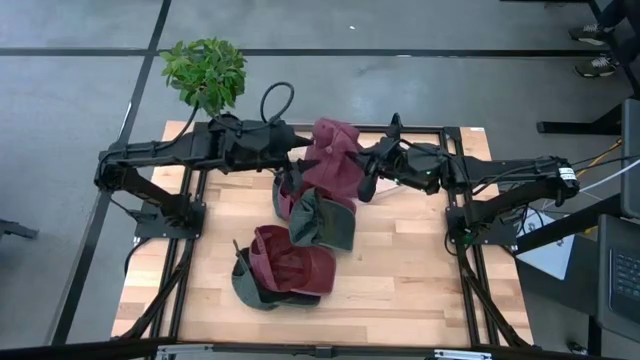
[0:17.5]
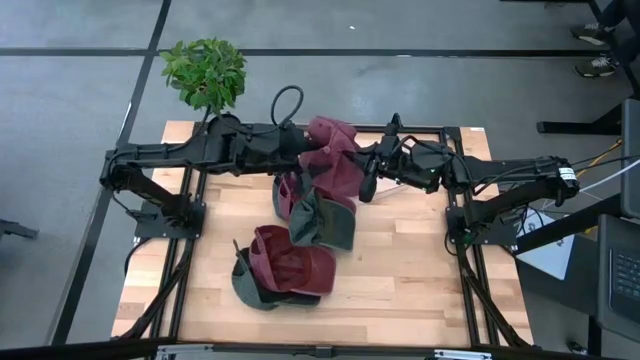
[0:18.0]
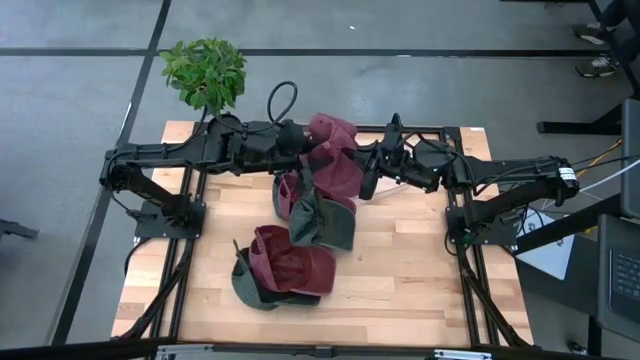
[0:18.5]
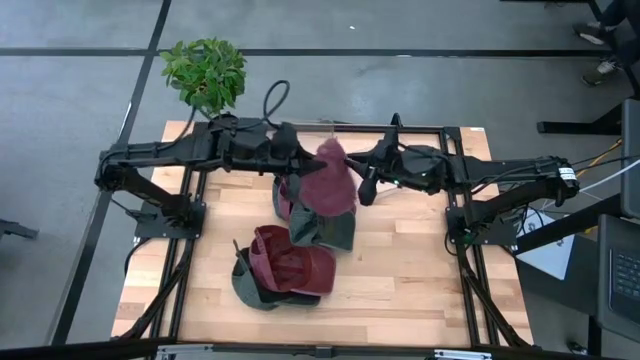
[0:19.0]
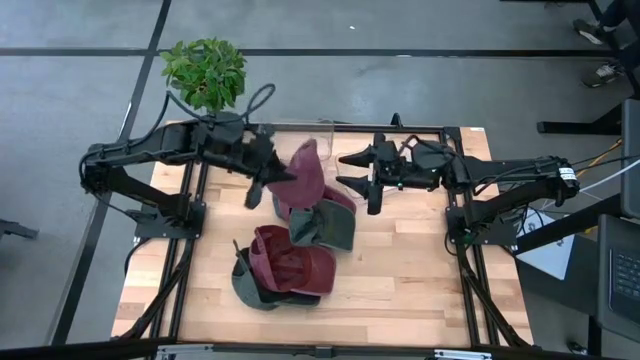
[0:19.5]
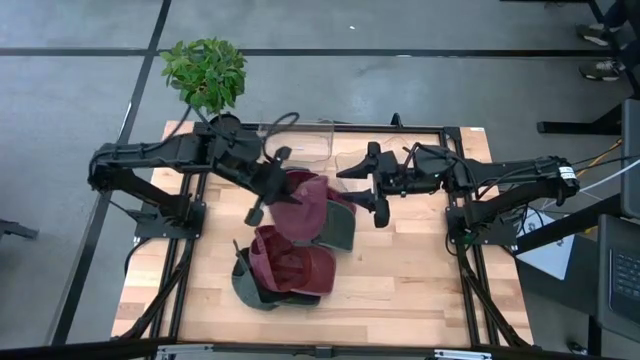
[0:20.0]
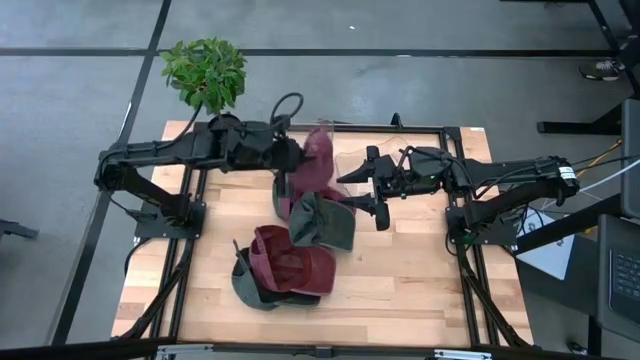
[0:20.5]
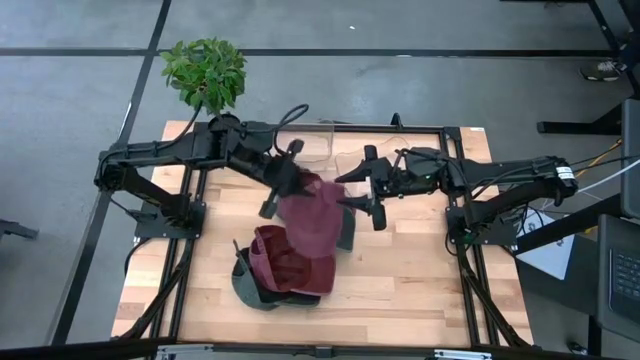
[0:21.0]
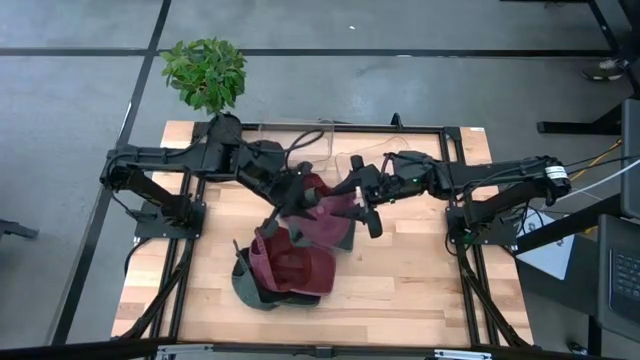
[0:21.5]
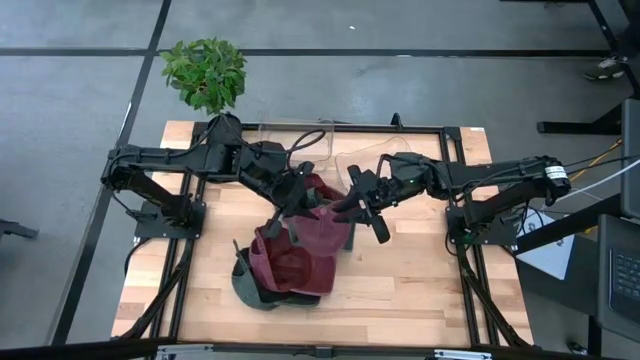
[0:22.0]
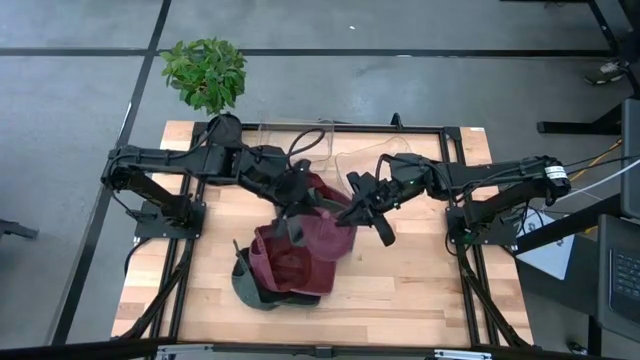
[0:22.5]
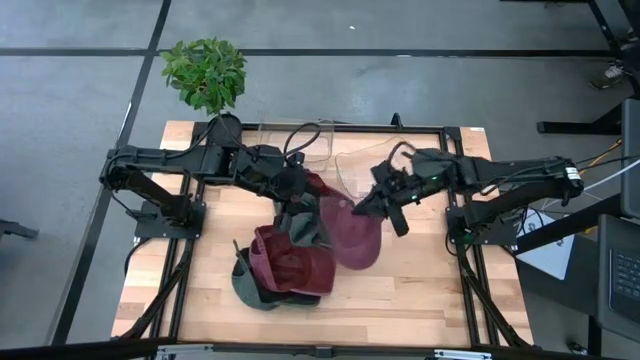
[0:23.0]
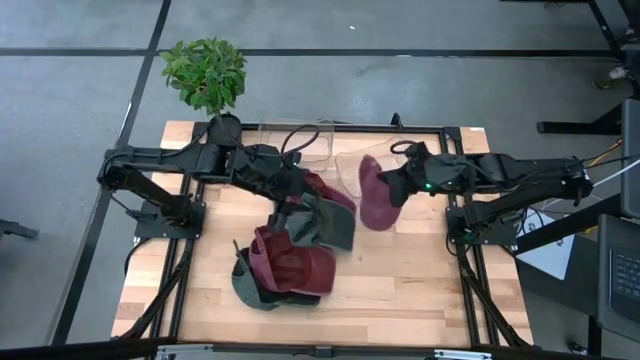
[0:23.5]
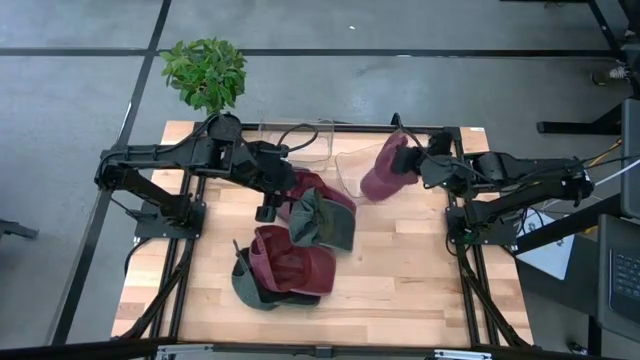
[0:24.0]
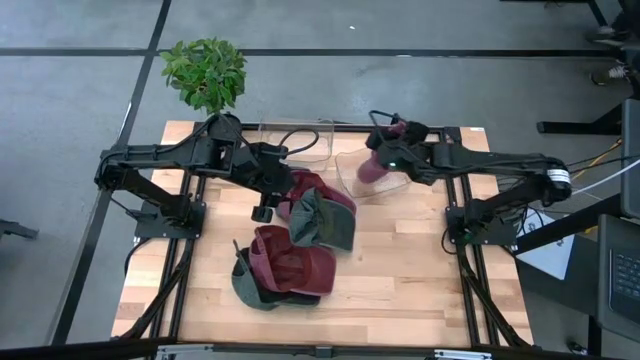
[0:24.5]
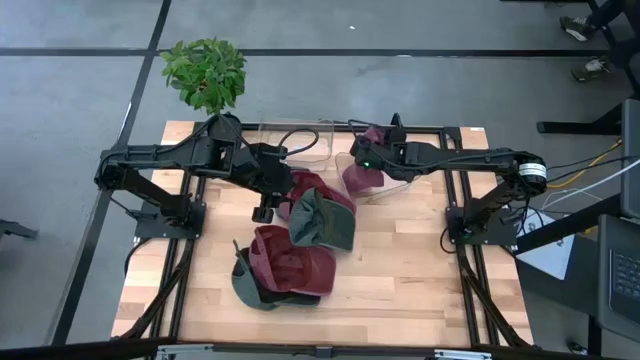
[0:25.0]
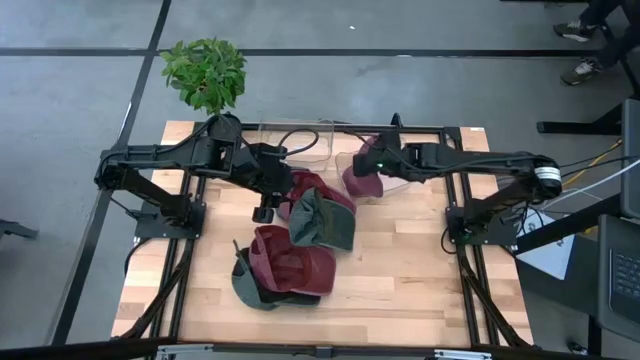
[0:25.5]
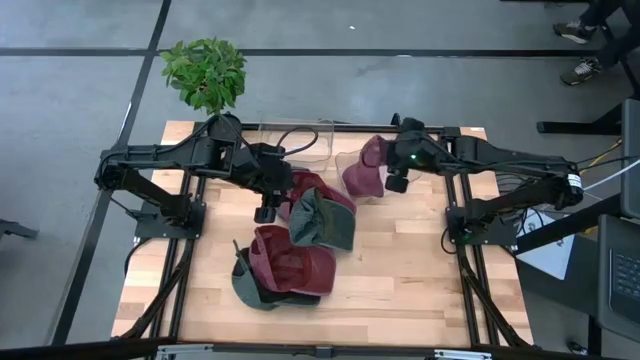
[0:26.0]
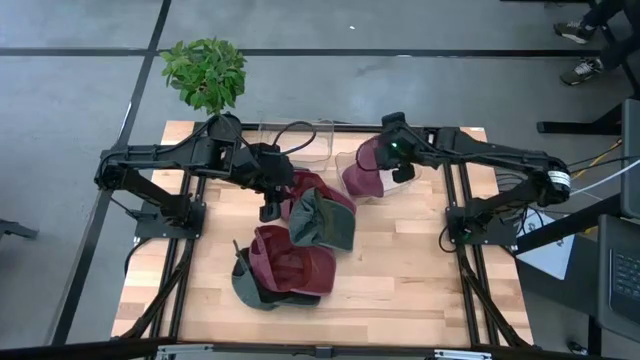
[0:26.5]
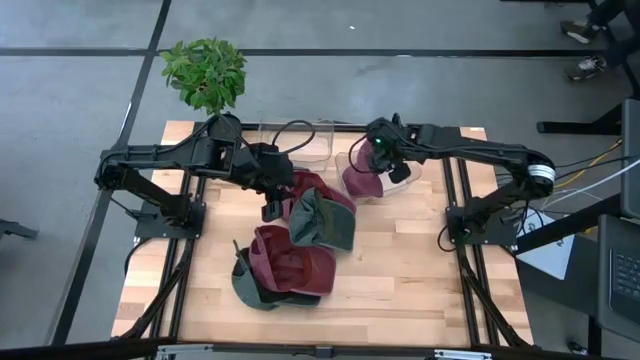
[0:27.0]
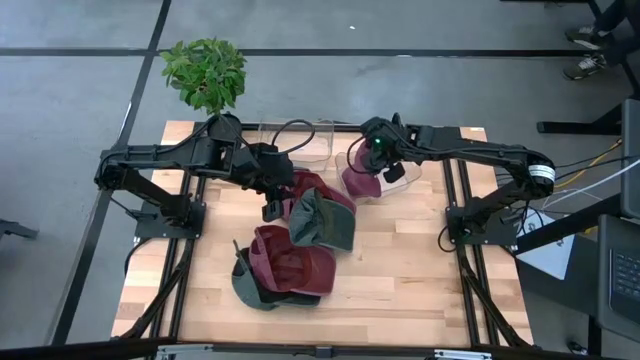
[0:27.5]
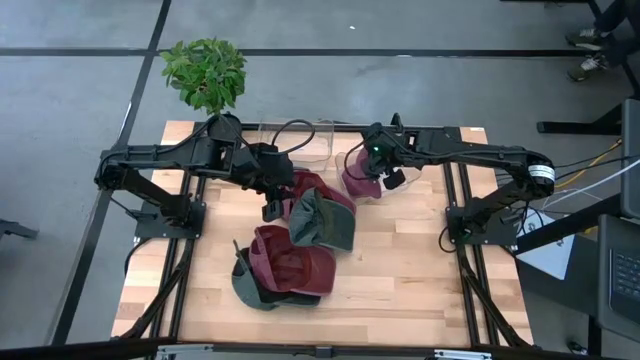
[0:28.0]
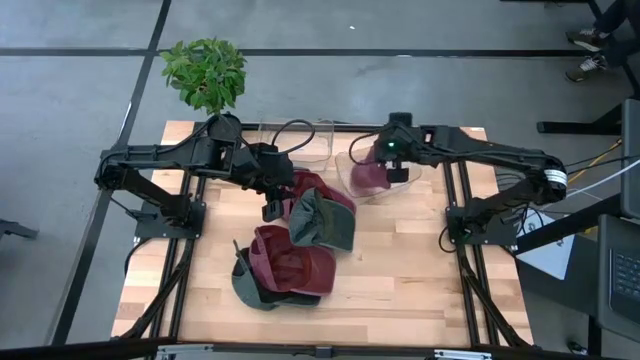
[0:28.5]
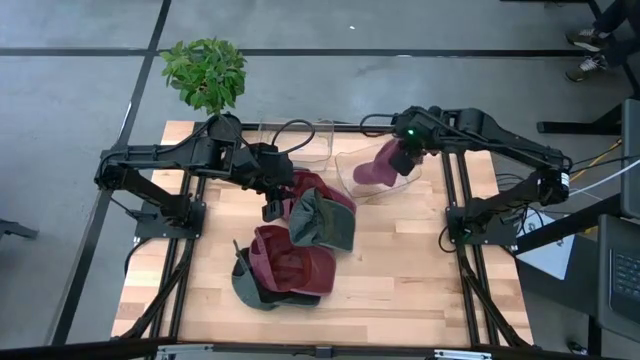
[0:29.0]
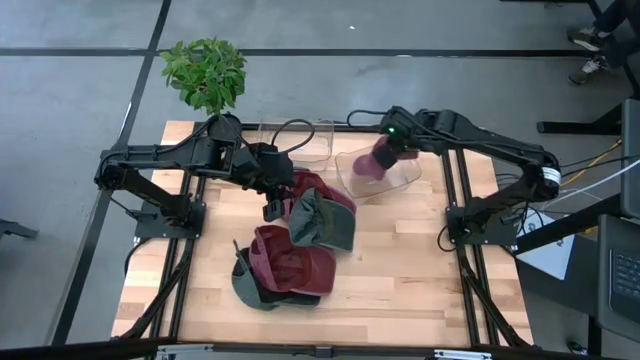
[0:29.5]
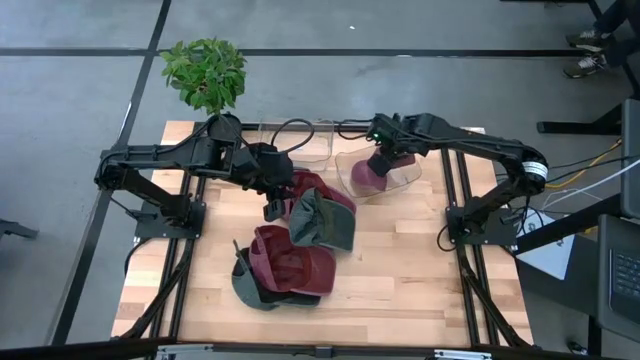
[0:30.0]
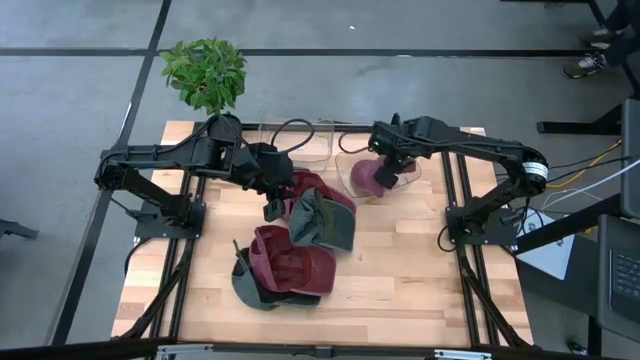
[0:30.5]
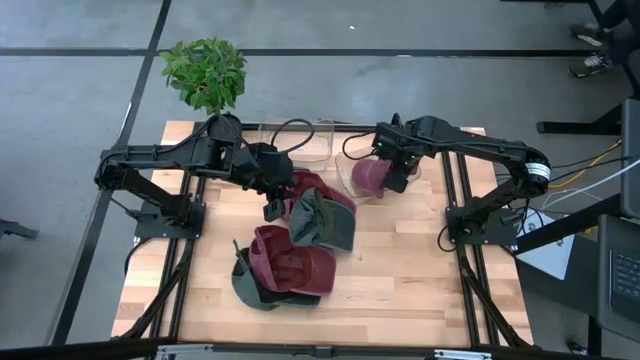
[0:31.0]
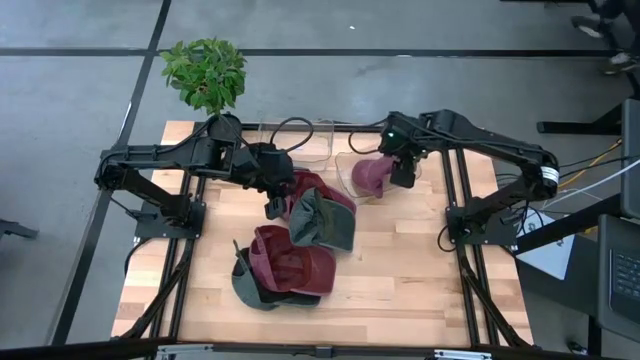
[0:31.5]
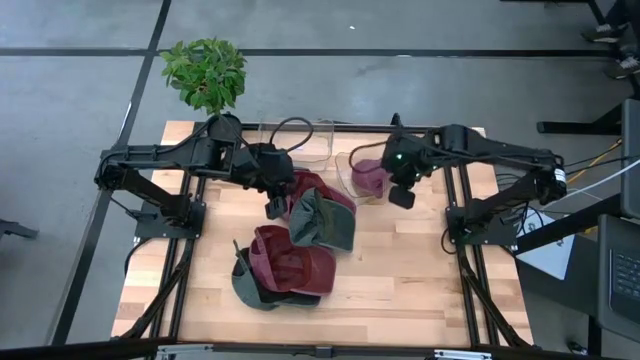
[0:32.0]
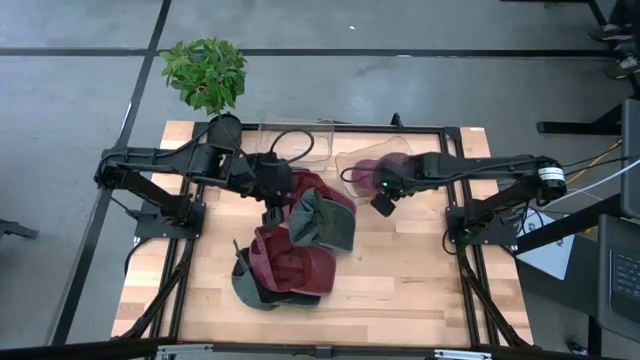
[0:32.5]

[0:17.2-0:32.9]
Task: Pick & Place hat
Put the bottom right red cap into the right transparent bin

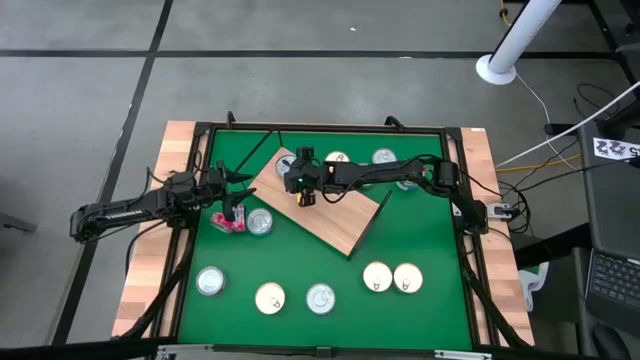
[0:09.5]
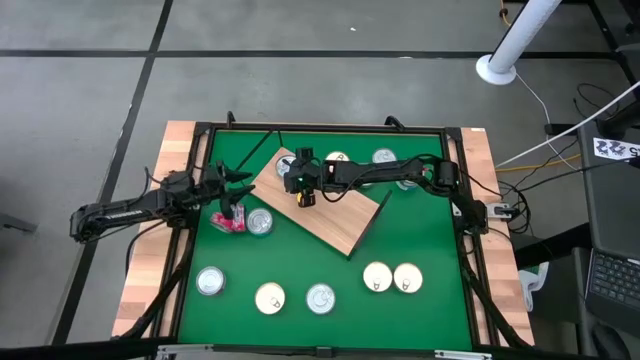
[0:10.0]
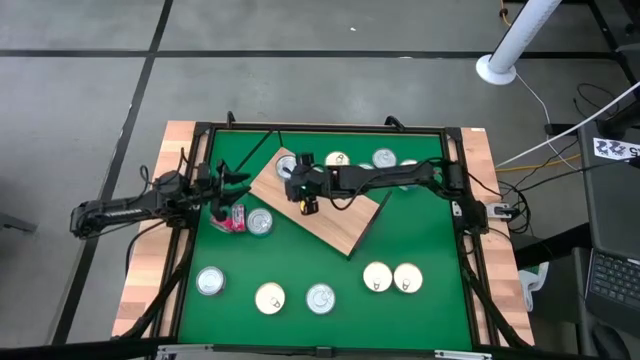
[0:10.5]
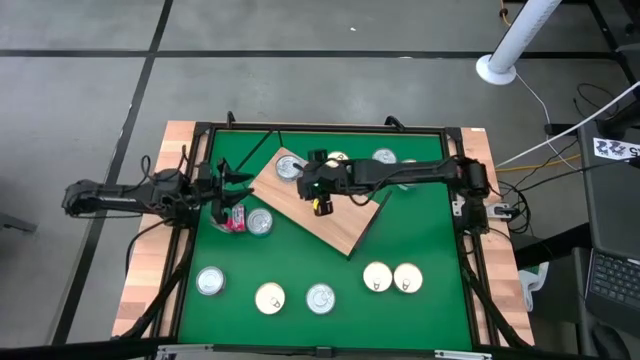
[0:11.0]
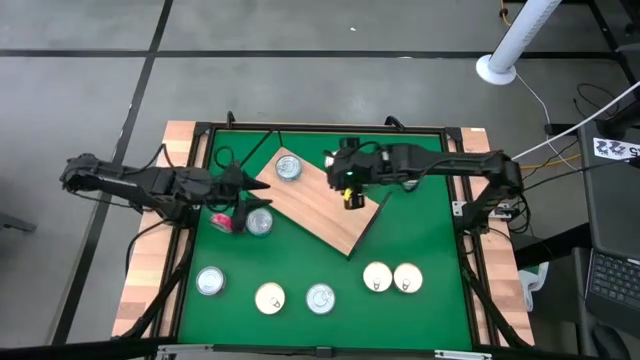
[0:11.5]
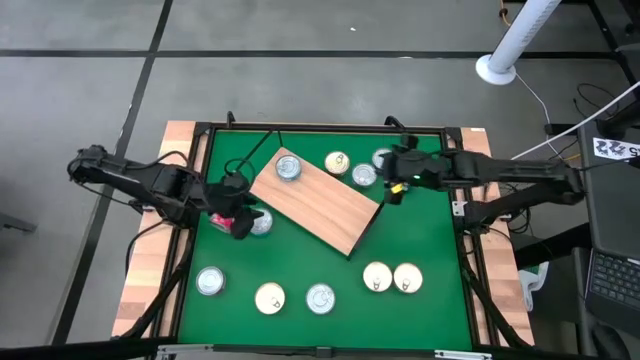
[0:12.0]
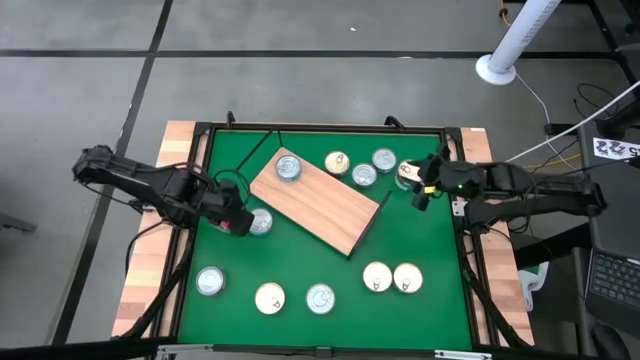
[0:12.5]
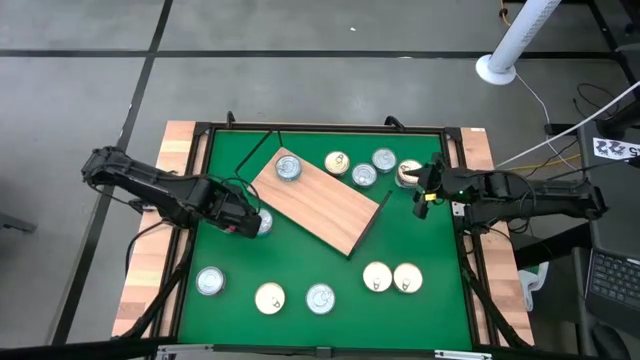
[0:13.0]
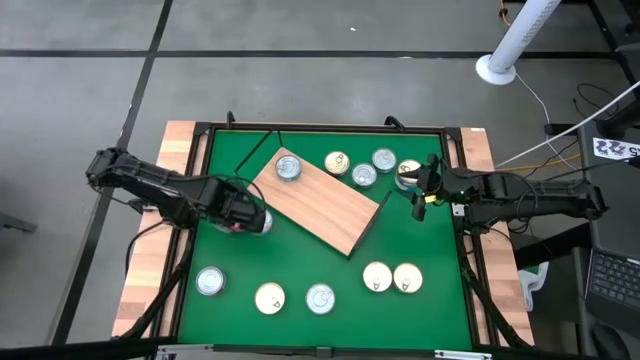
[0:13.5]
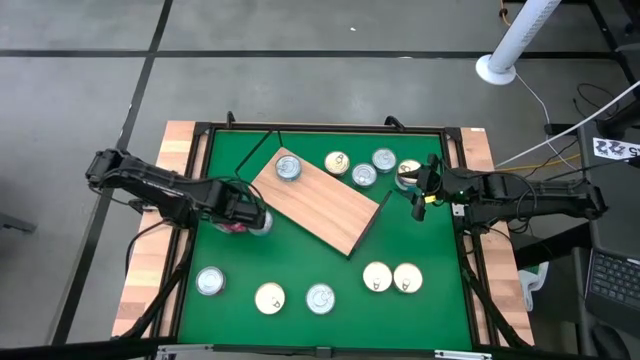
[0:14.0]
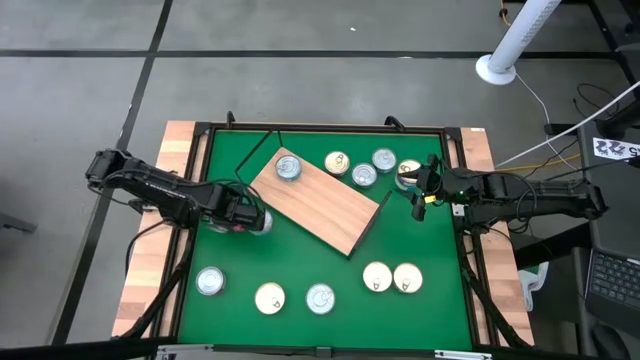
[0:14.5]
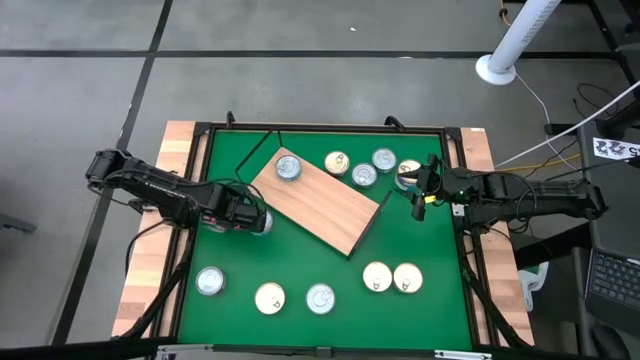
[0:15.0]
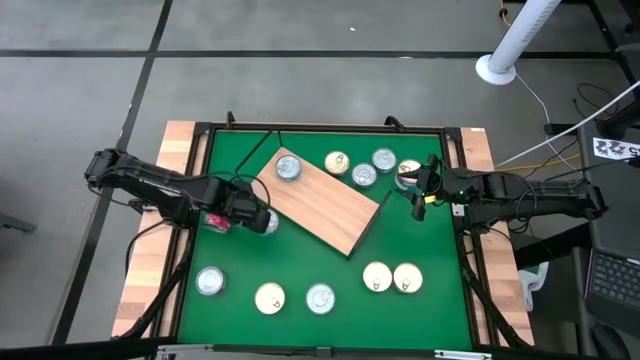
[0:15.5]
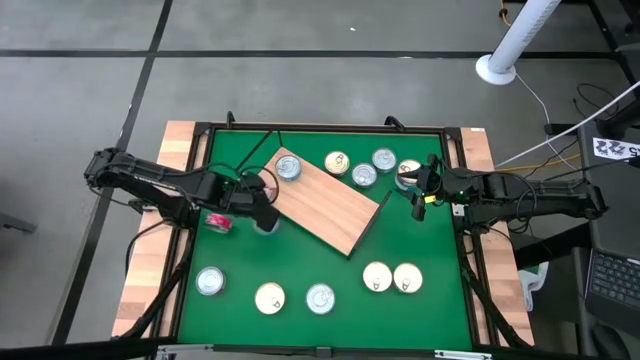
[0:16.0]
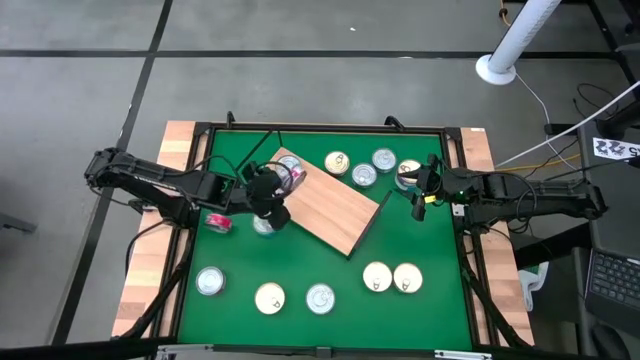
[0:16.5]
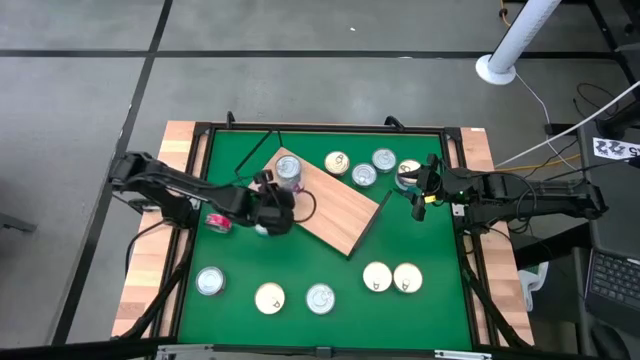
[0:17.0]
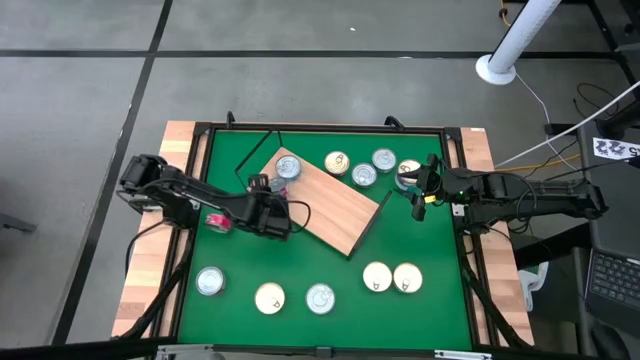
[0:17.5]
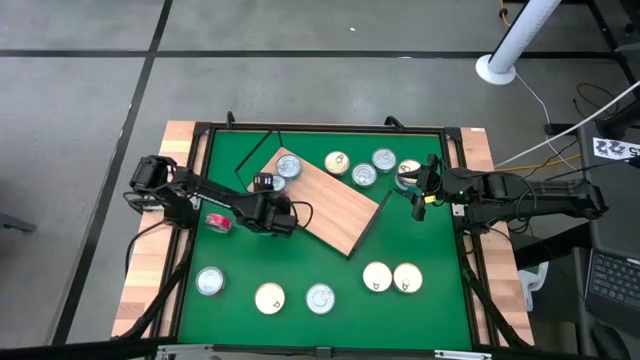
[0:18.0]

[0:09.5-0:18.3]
Task: Stack canned seafood by type on shelf
Put the red tuna can on the shelf
